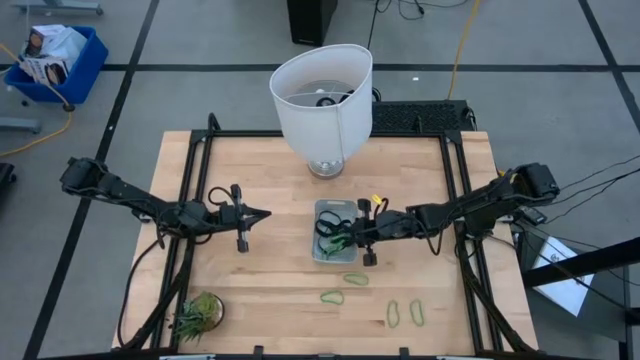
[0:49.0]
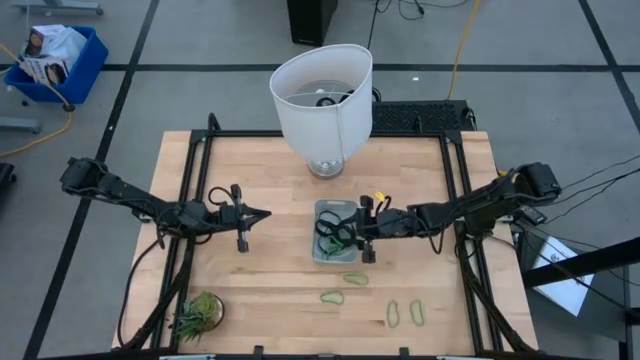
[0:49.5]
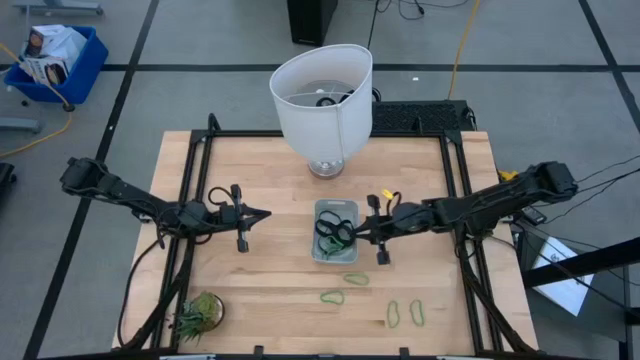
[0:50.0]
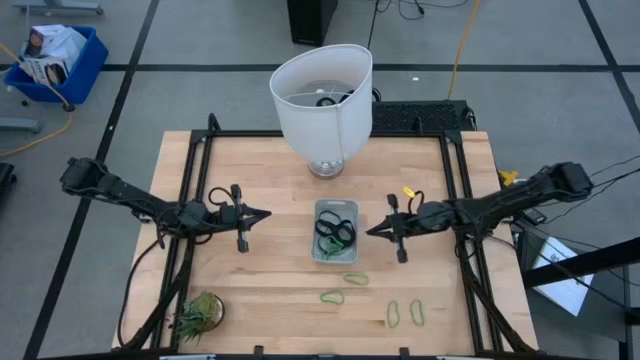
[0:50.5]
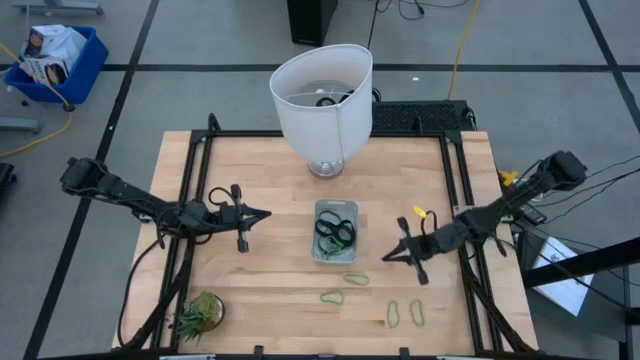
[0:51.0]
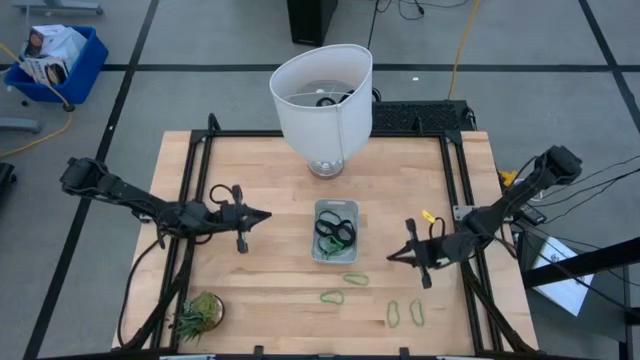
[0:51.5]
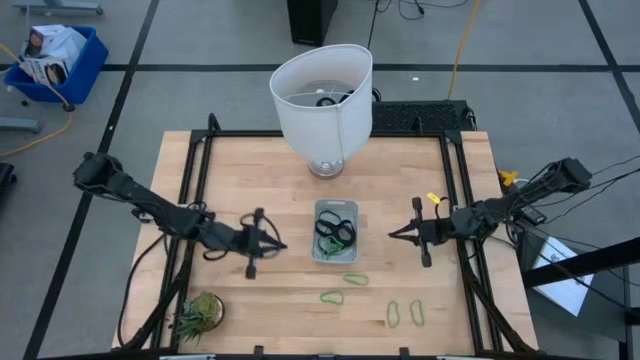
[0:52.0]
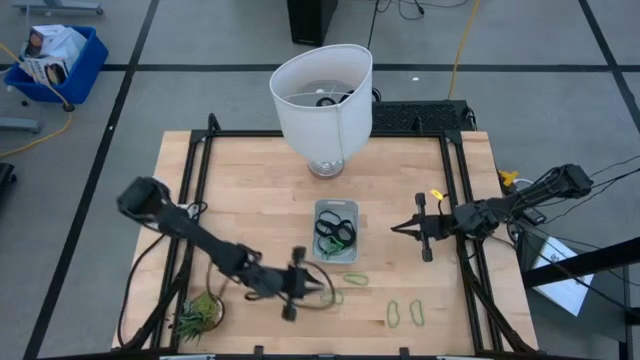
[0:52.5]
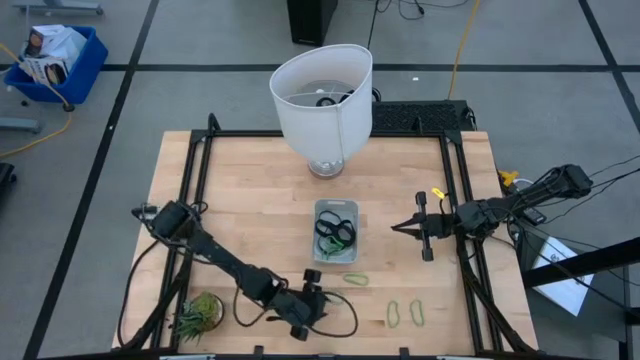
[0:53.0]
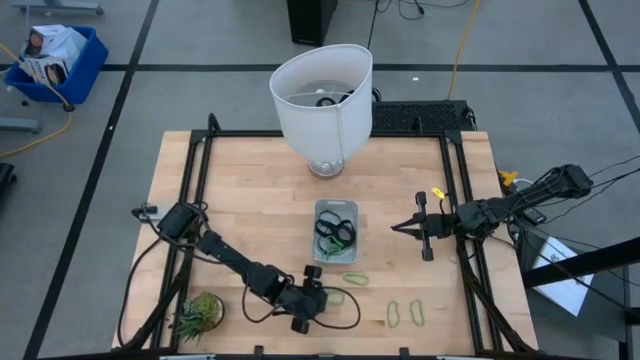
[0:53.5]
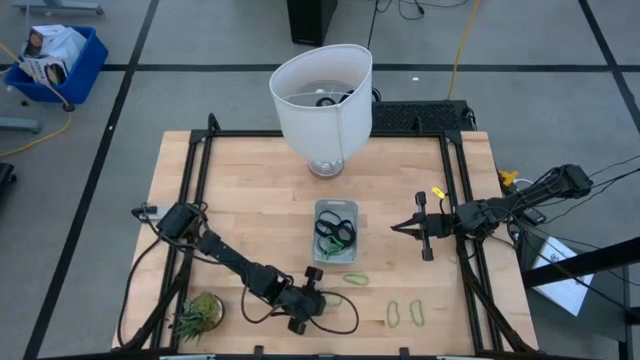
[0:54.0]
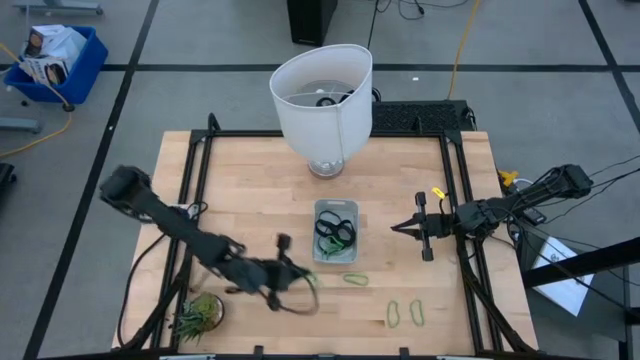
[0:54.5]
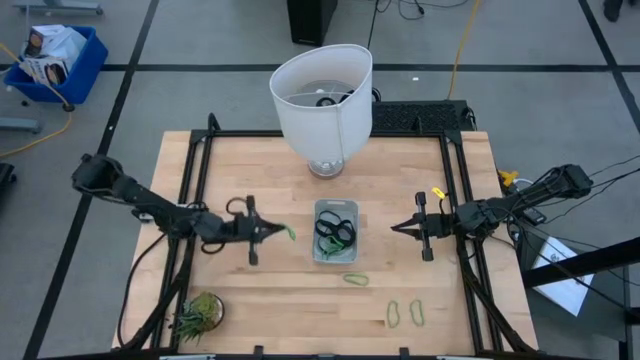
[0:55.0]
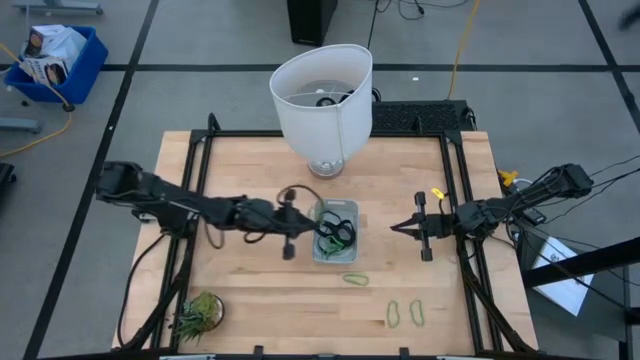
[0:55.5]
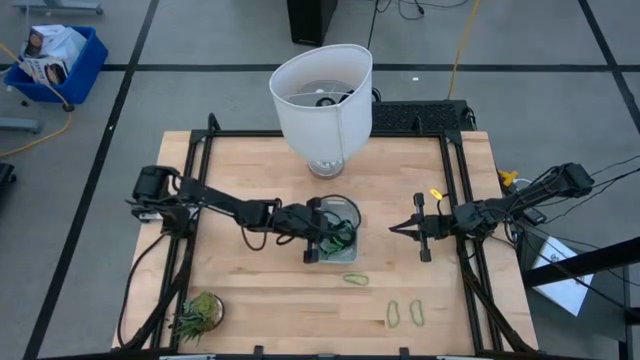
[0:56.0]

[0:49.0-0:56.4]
Task: Pick and place rubber bands into bin
Put the green rubber band into the gray bin

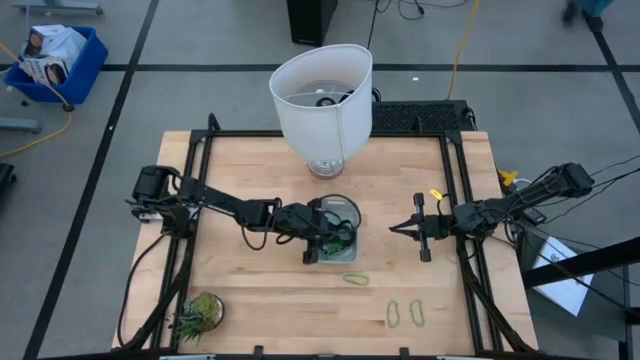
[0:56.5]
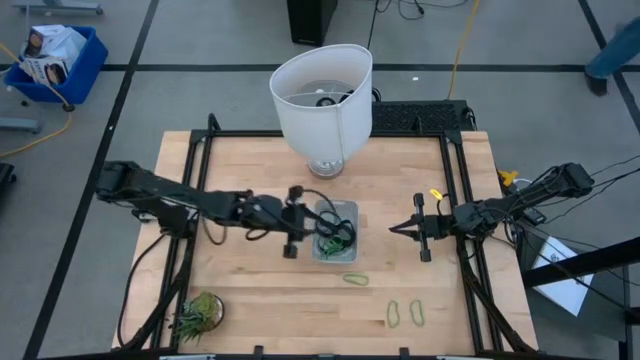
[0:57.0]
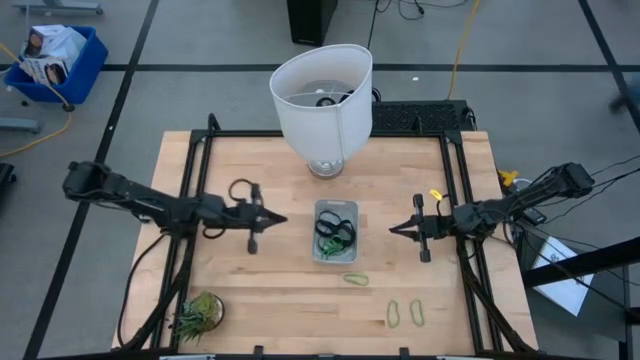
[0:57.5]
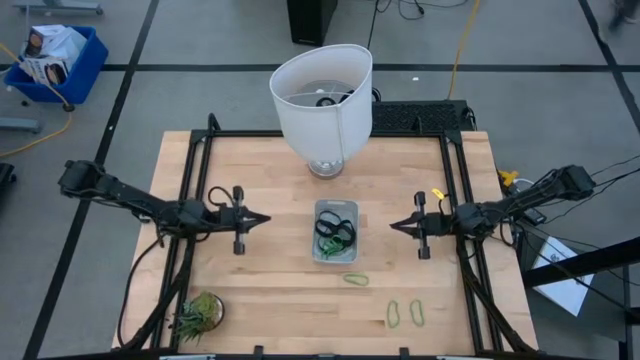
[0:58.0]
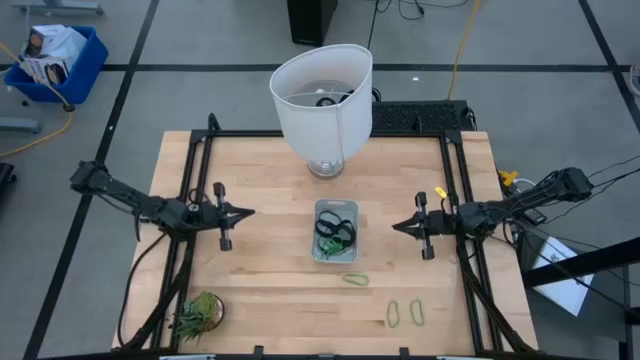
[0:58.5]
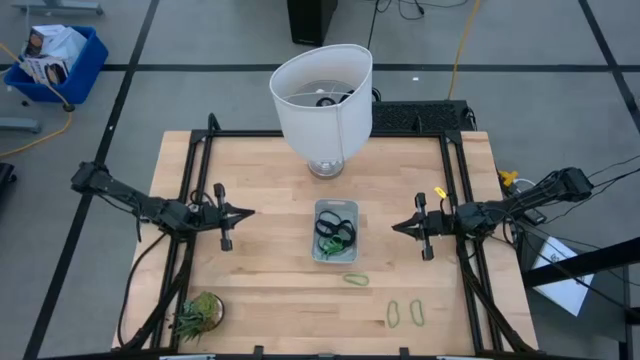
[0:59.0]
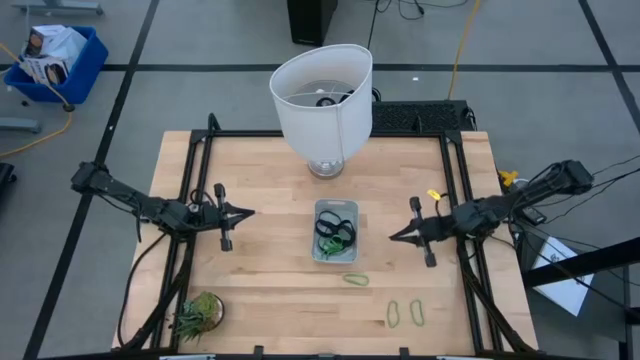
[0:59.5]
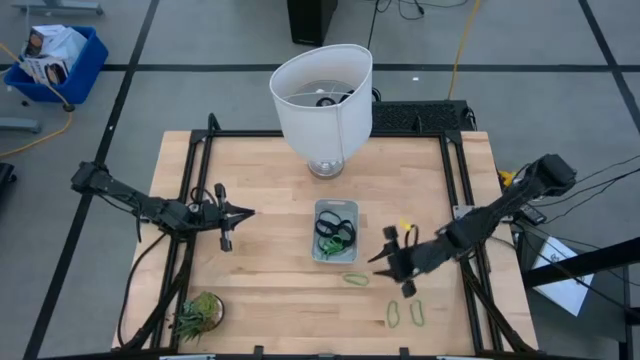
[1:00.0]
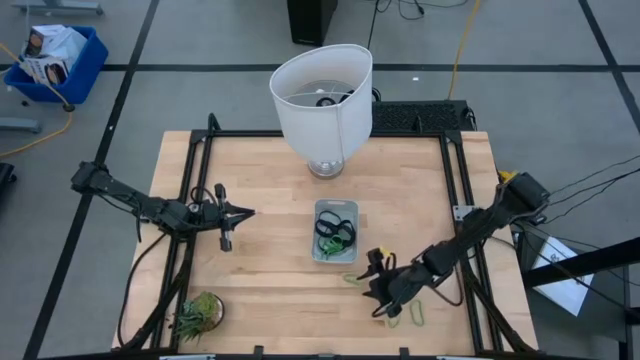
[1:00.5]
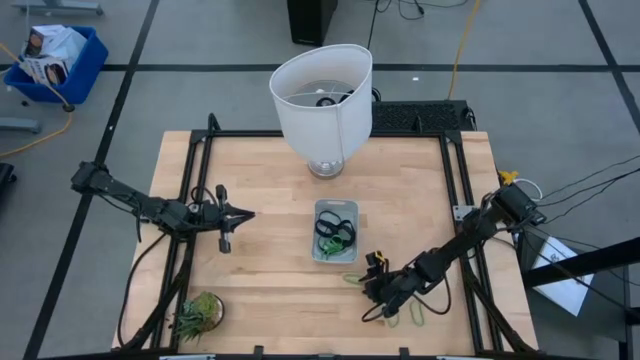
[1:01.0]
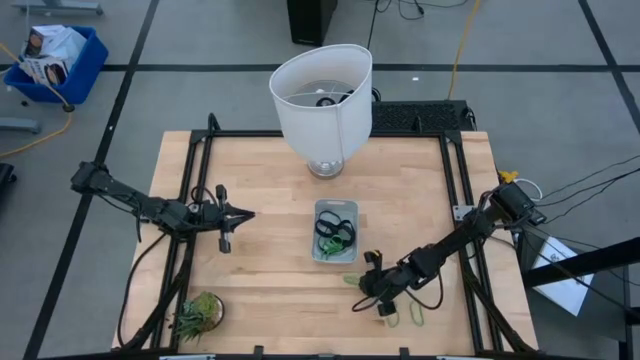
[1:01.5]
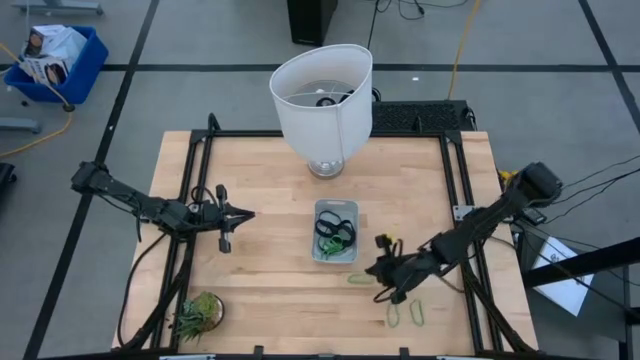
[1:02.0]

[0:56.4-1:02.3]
Put the green rubber band into the gray bin

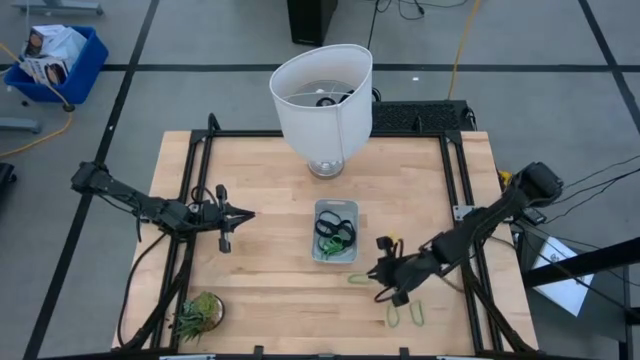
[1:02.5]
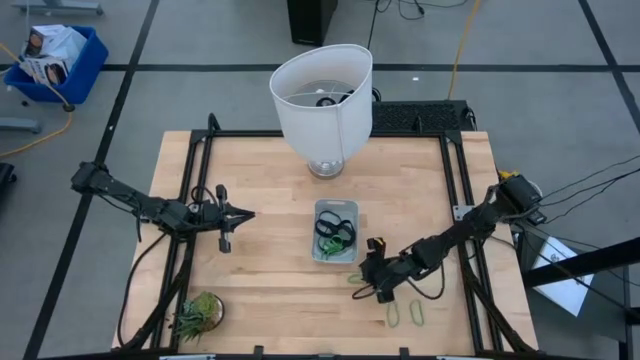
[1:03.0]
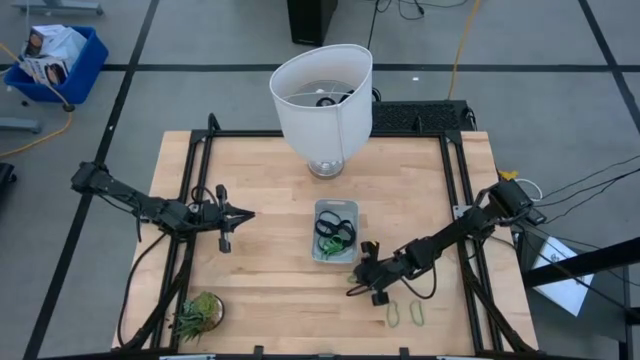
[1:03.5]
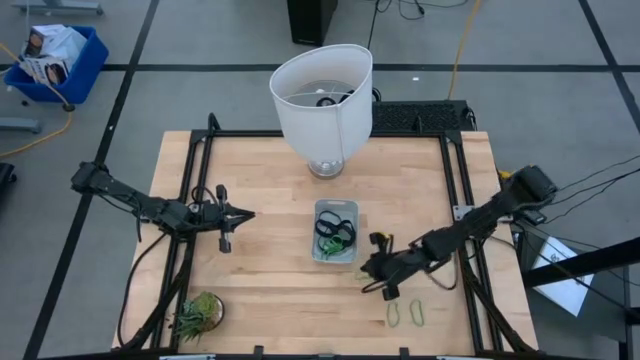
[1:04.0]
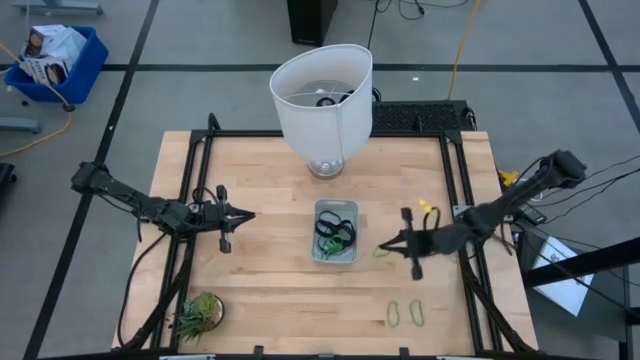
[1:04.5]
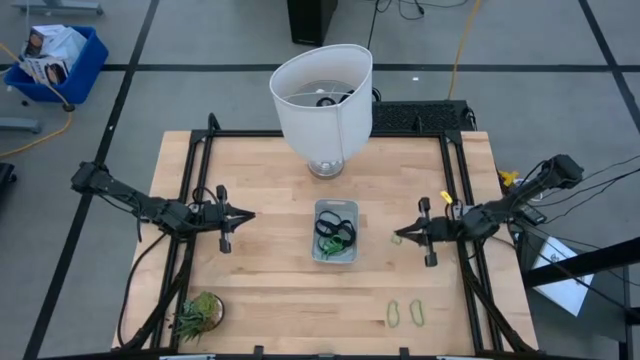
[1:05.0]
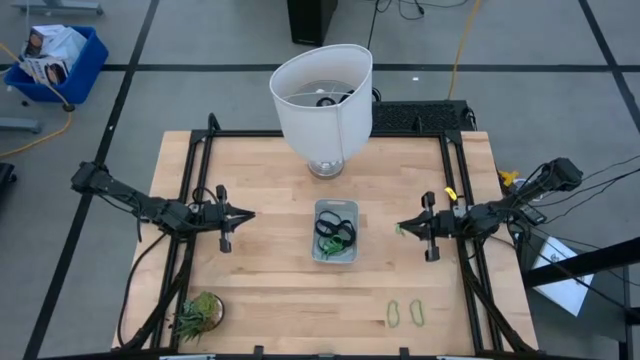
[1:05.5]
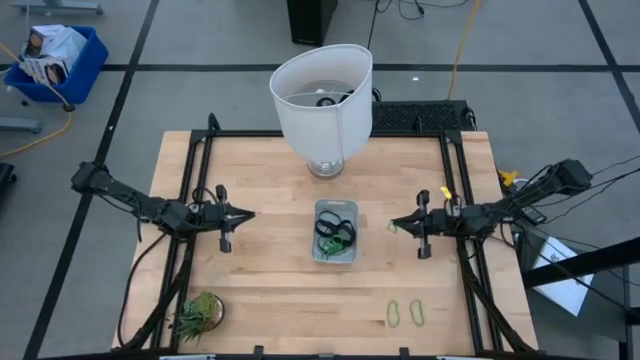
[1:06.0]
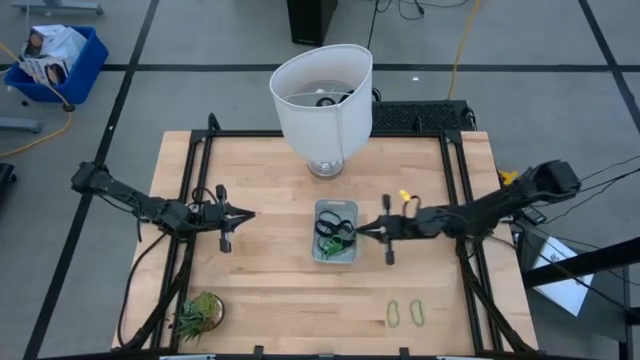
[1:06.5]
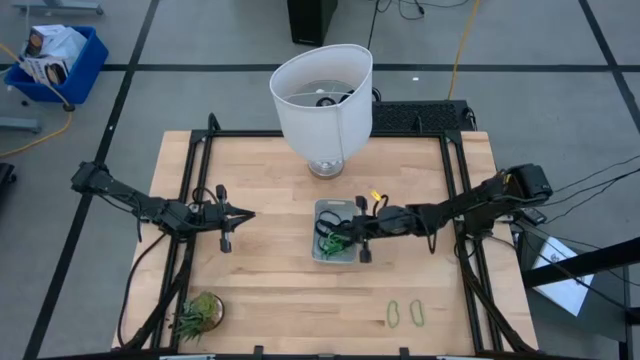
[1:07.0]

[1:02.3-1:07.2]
Put the green rubber band into the gray bin

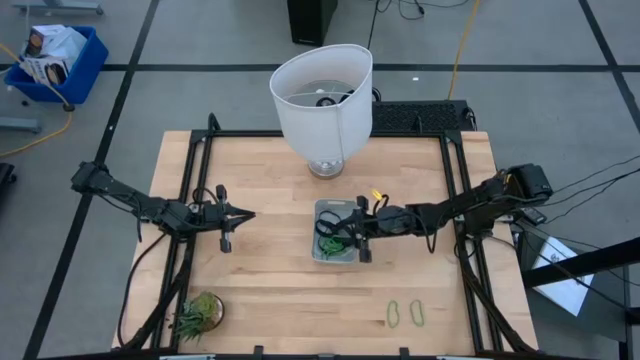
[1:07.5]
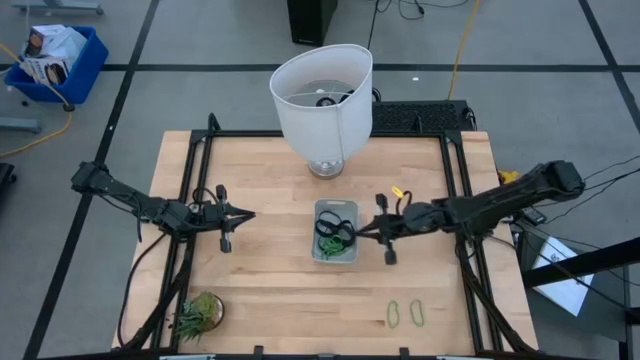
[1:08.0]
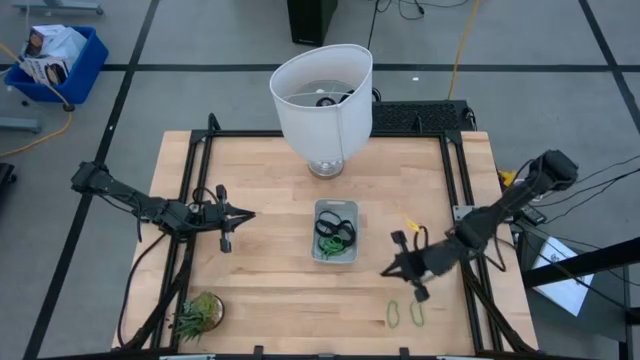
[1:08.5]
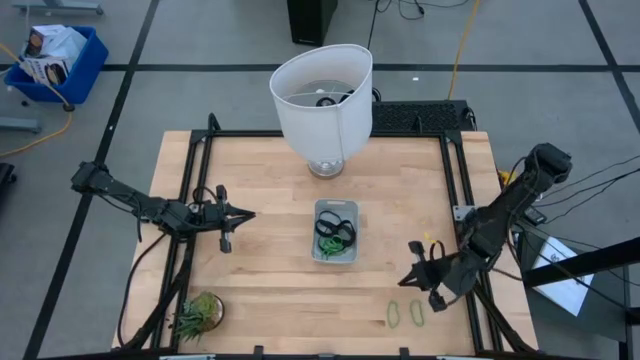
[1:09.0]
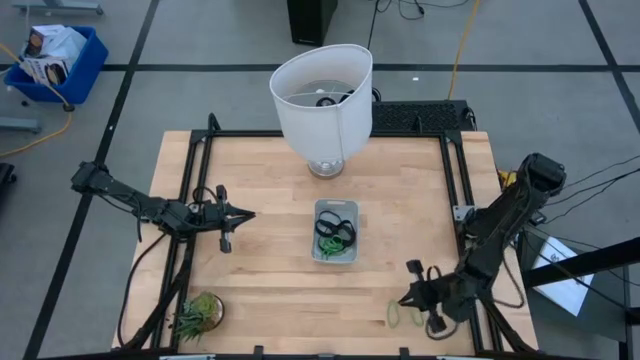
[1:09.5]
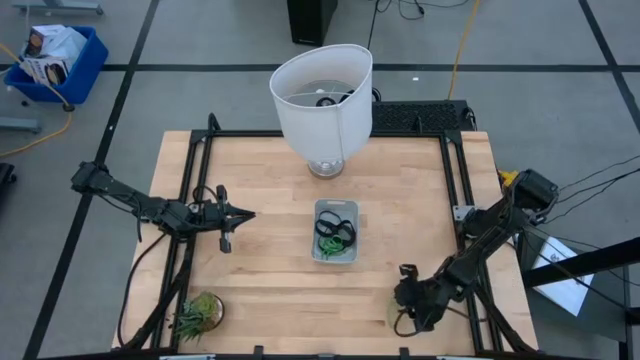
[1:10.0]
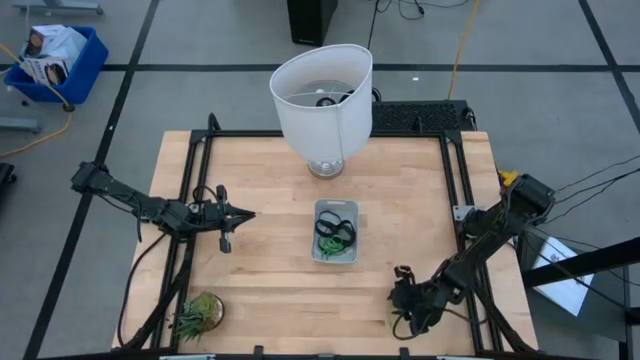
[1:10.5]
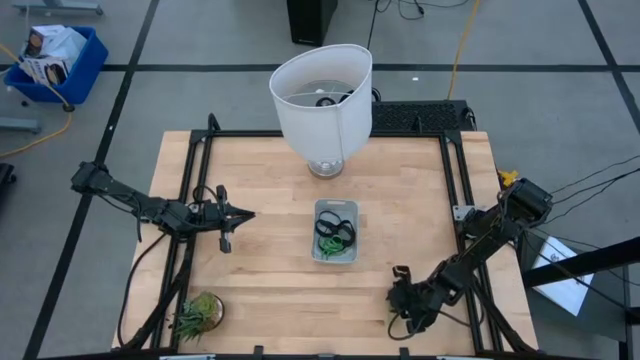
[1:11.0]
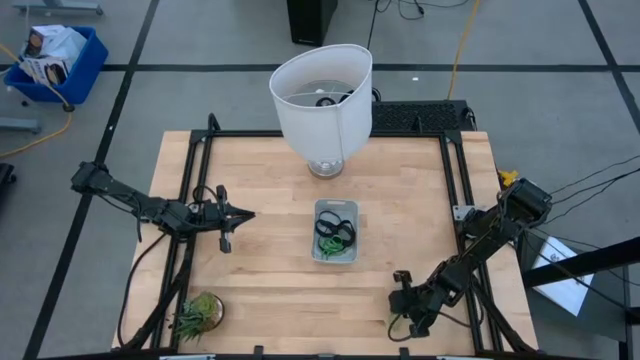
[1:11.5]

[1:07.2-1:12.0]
Put the green rubber band into the gray bin
